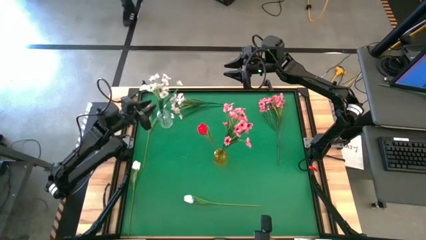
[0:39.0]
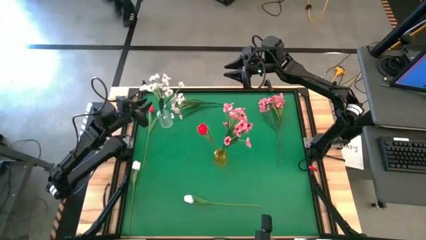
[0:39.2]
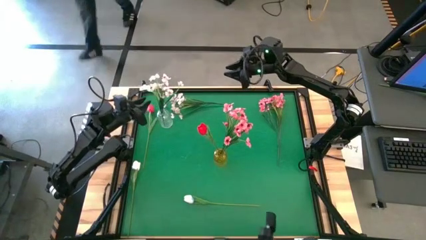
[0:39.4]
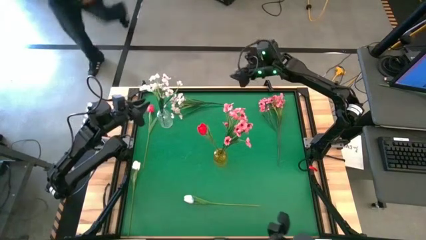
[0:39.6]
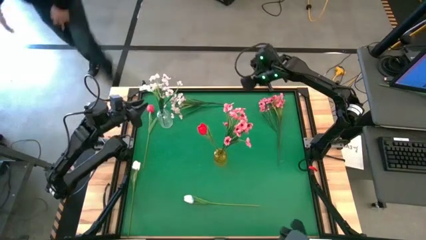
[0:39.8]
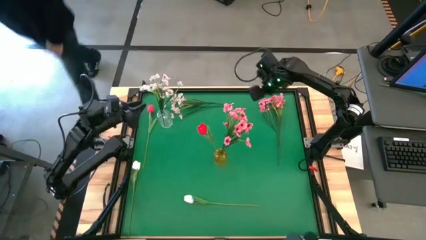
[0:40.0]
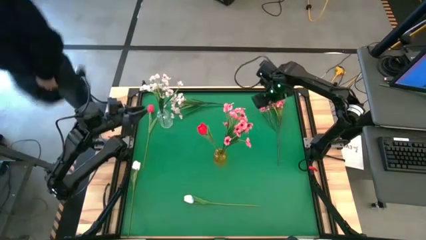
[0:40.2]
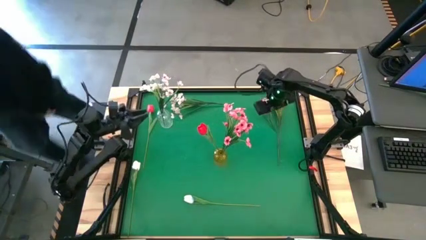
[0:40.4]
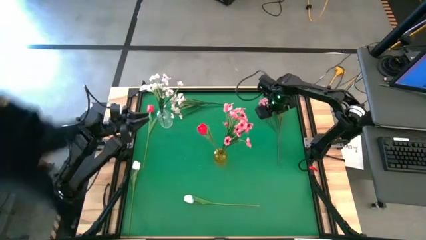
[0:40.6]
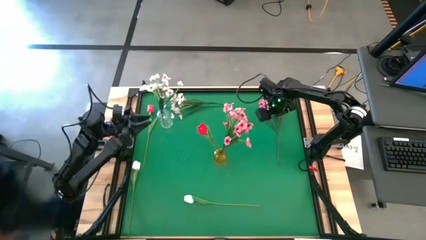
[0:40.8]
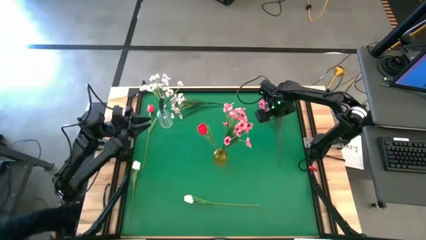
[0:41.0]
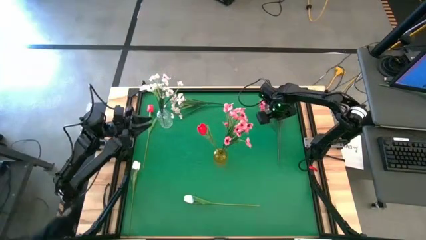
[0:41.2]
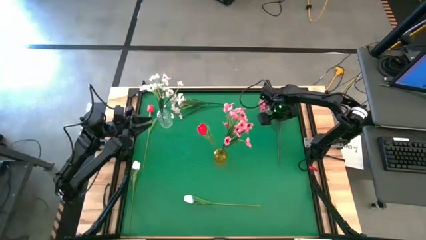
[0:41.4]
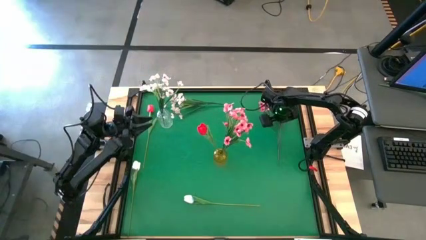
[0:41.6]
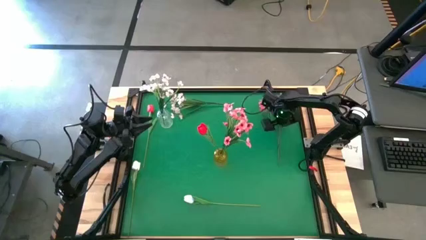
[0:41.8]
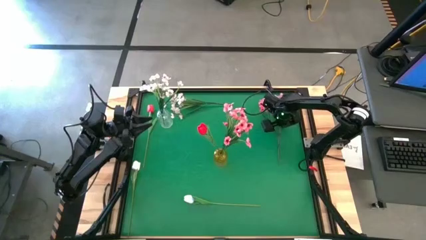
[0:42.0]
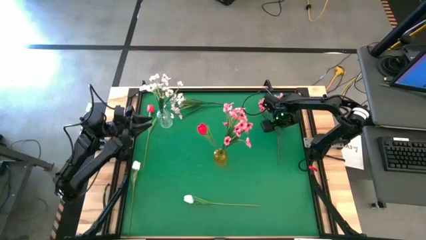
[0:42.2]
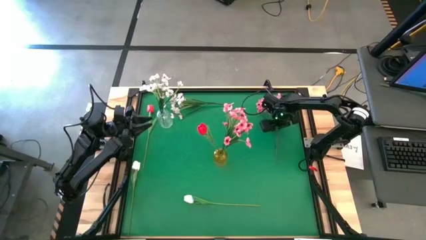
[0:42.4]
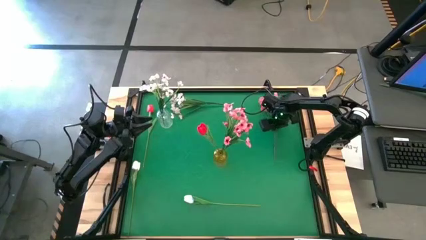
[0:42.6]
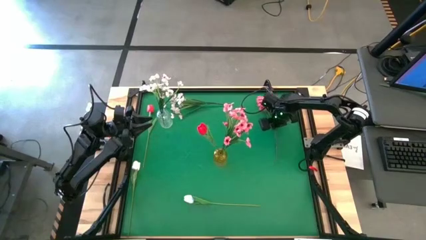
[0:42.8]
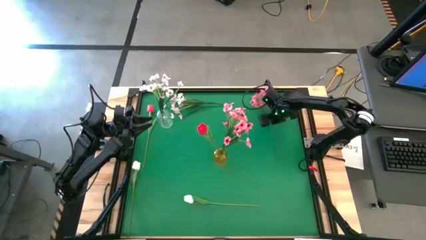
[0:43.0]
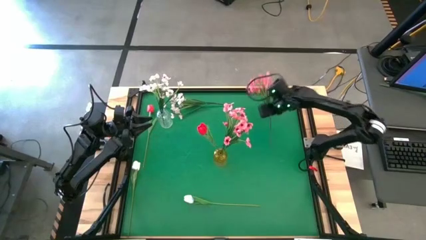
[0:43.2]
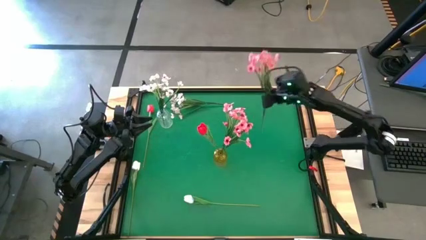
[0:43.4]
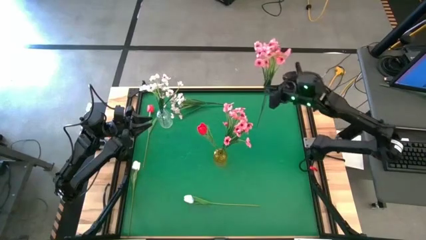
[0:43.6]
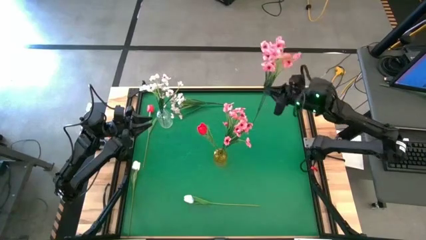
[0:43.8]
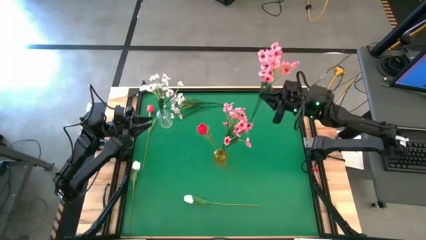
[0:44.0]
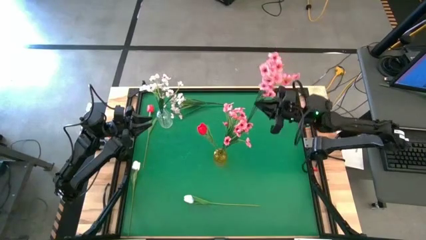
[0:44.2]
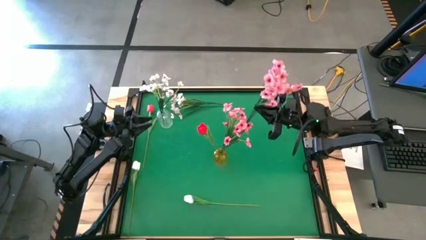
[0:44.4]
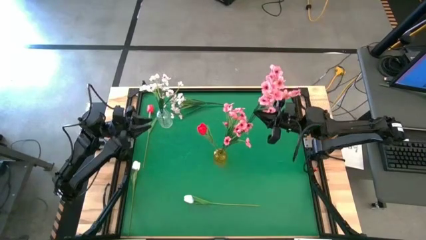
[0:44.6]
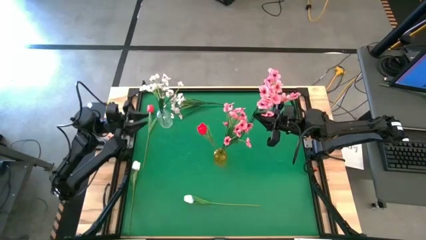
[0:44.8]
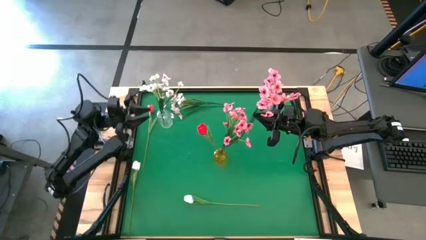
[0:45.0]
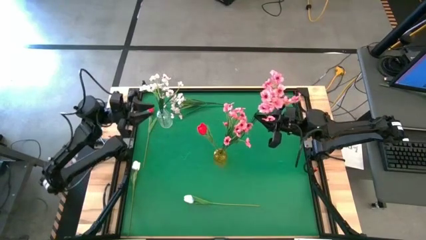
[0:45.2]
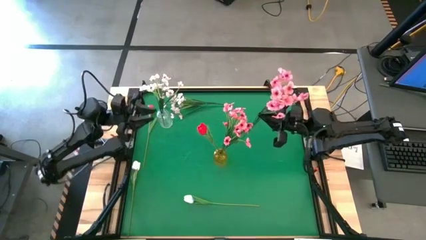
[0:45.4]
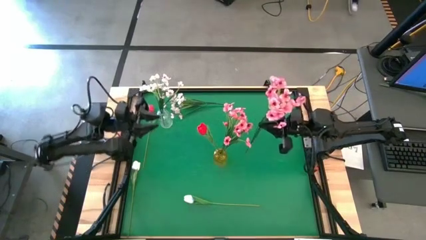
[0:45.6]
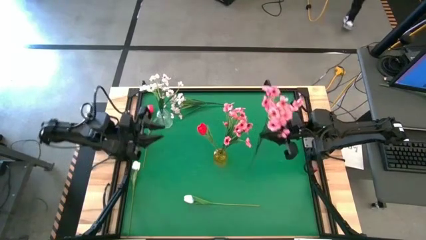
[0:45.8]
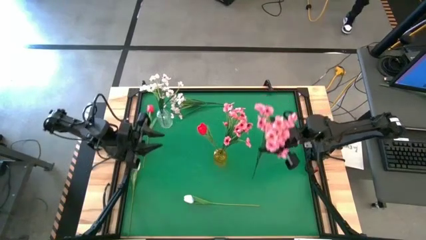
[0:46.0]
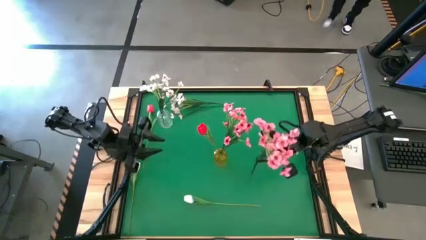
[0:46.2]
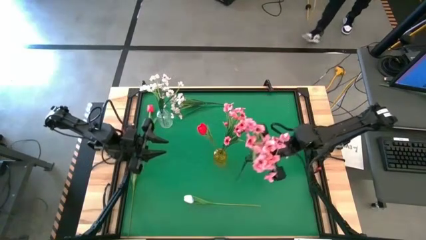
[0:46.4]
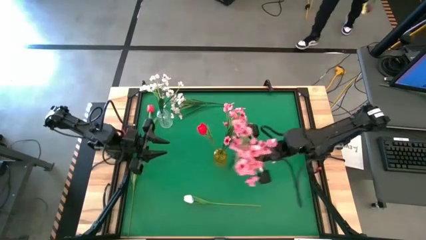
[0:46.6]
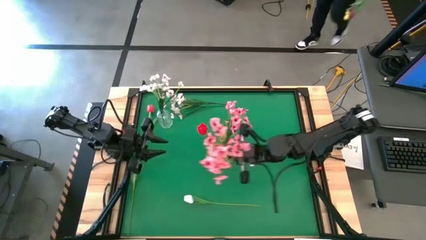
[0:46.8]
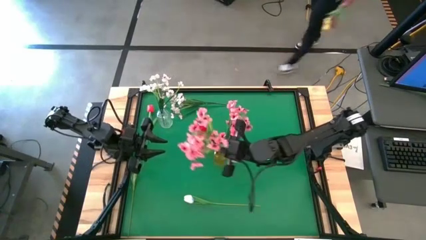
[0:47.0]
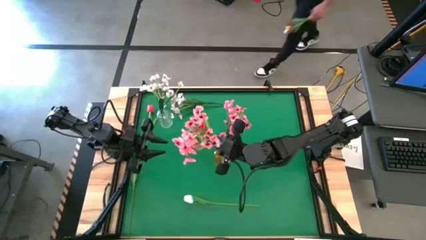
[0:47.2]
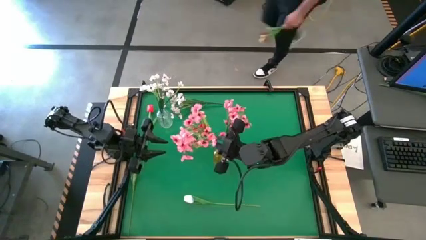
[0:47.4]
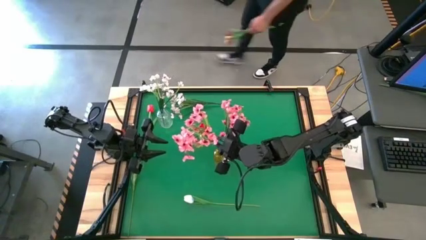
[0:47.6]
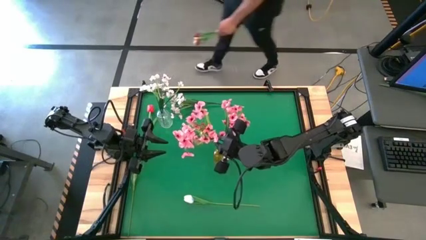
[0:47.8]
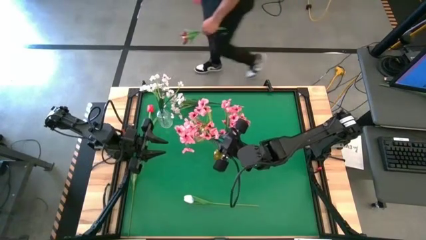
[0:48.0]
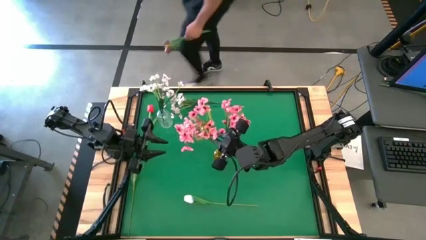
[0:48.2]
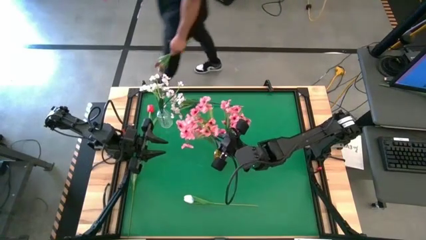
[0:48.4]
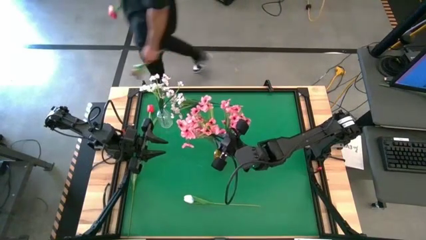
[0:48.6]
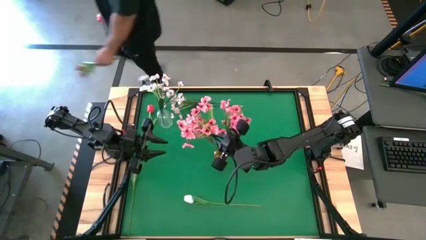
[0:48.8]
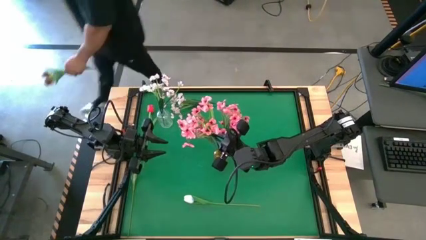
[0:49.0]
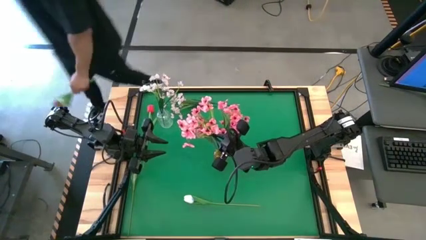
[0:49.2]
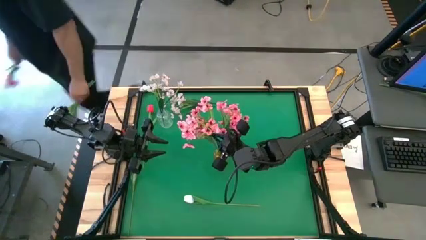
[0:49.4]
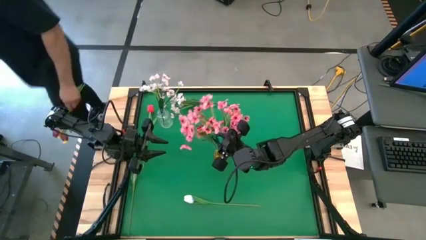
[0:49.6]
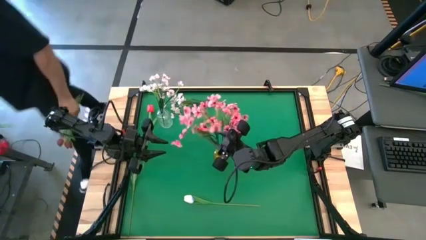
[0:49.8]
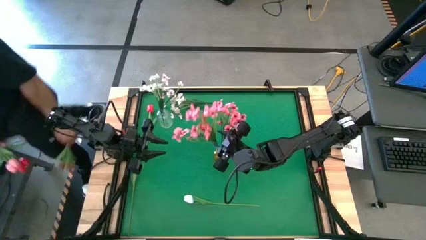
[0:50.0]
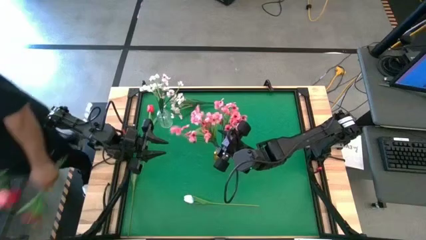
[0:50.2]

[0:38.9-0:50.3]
Task: Sort flowers into vase by color
Put the pink flowers into the yellow vase
